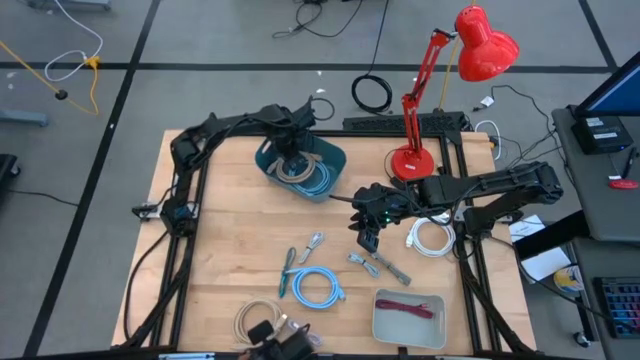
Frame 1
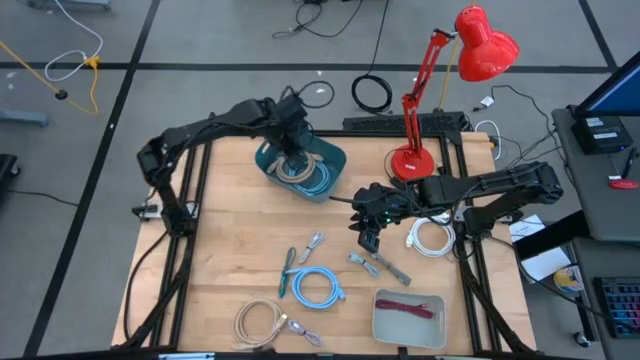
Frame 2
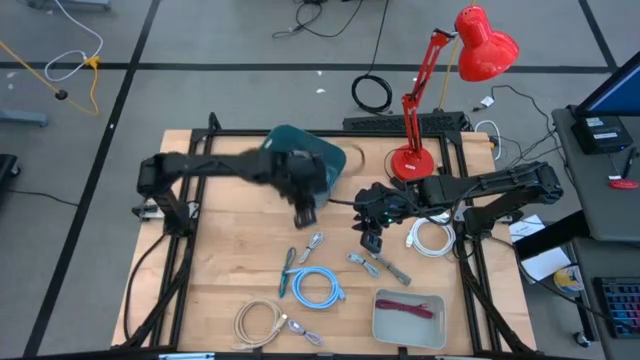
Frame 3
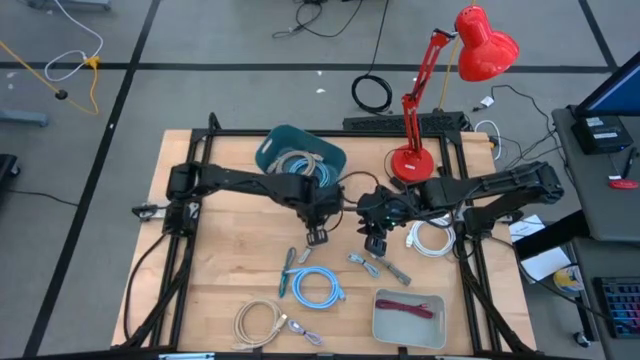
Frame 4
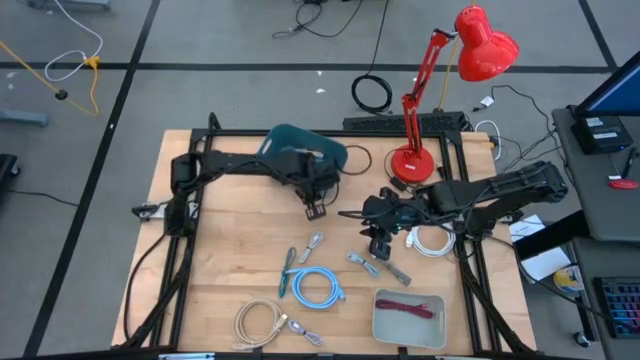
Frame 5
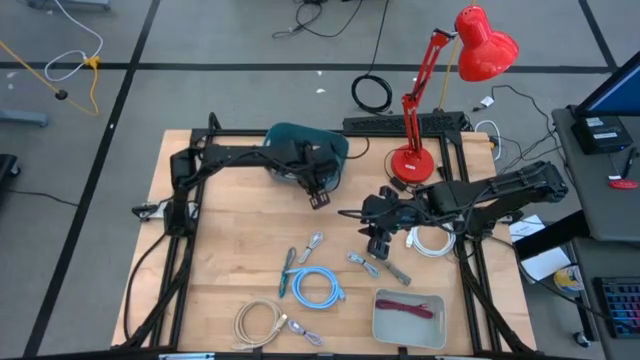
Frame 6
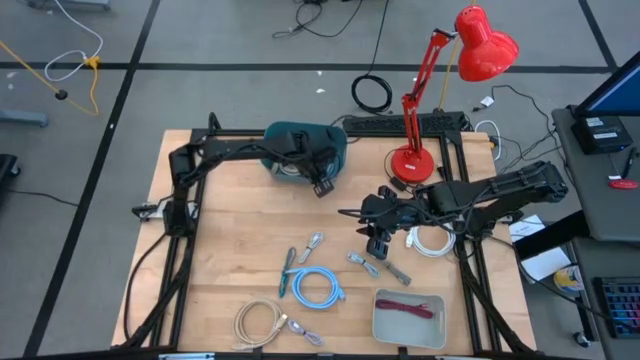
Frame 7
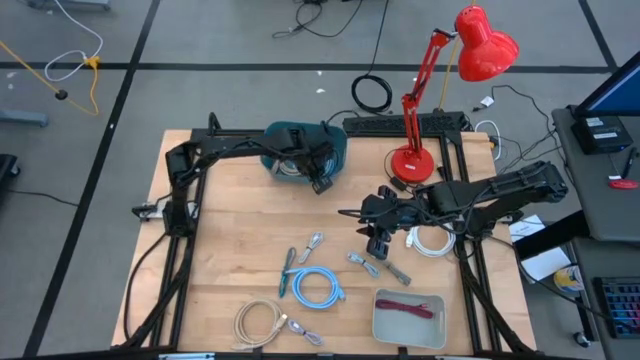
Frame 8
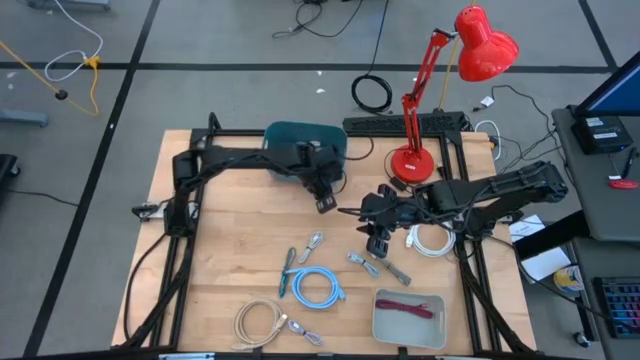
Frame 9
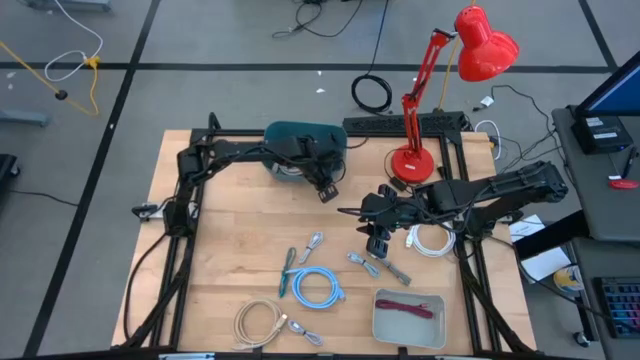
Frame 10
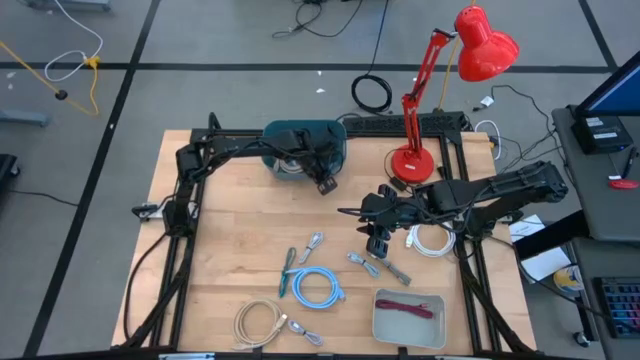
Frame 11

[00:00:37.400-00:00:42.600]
Task: Sort cables into bins
Adjust the blue bin on the table

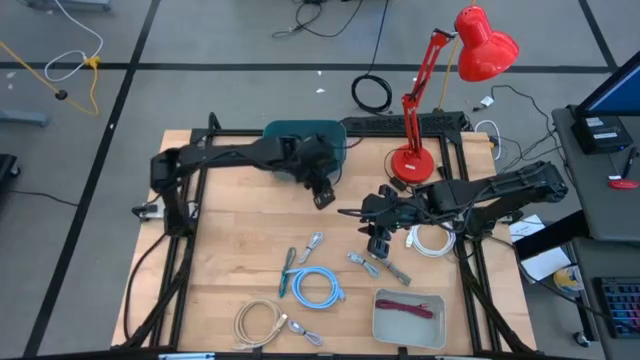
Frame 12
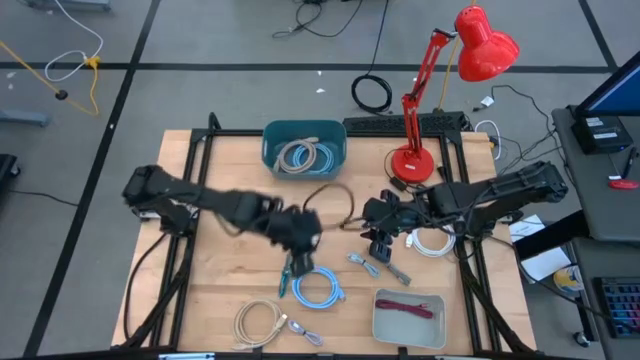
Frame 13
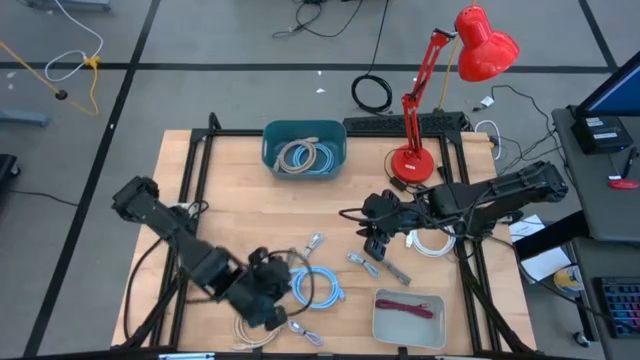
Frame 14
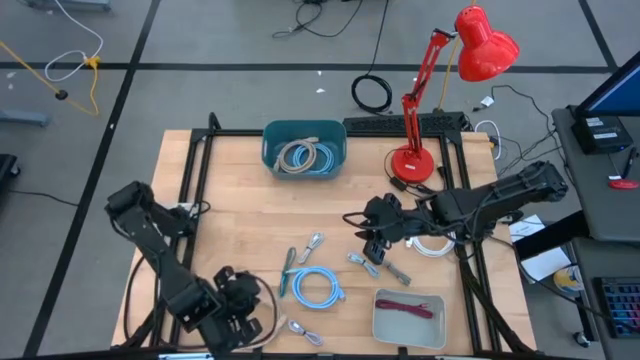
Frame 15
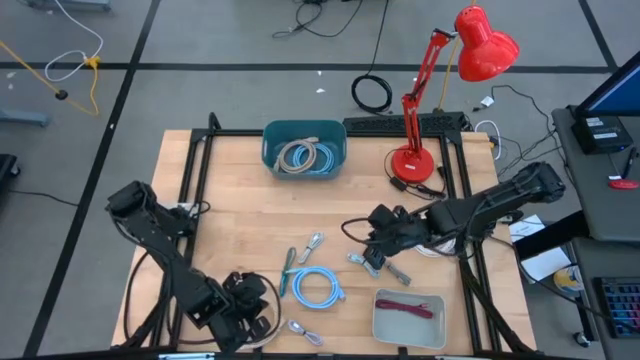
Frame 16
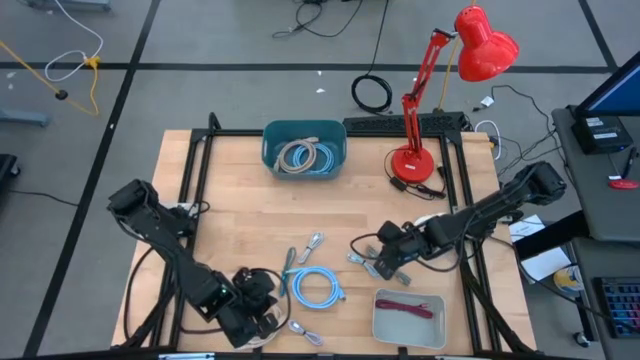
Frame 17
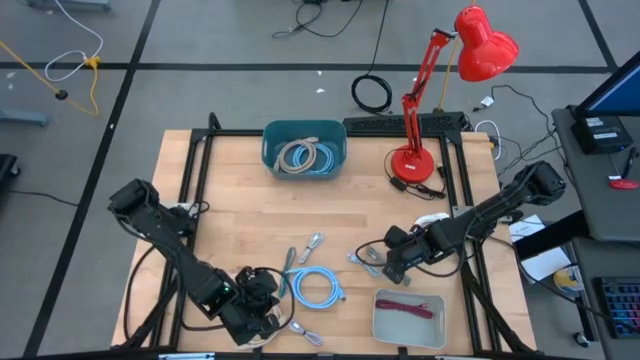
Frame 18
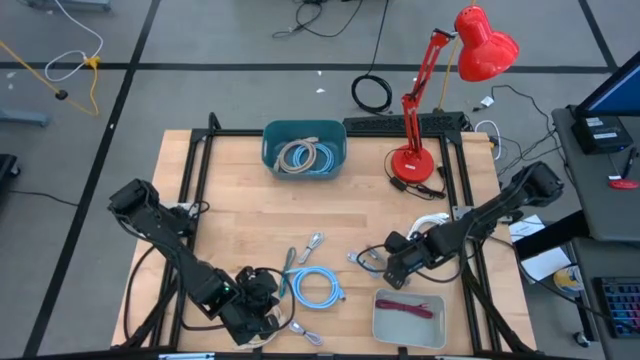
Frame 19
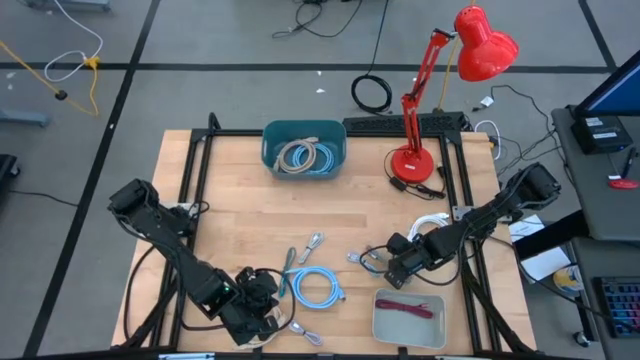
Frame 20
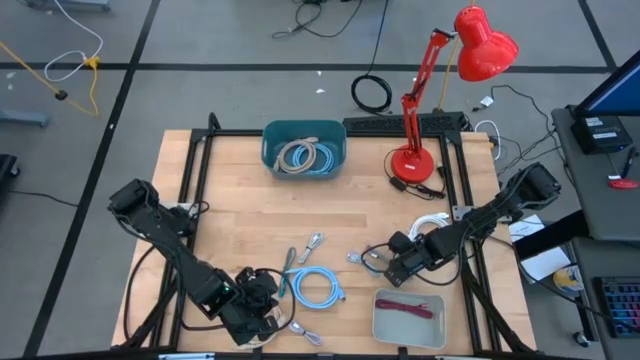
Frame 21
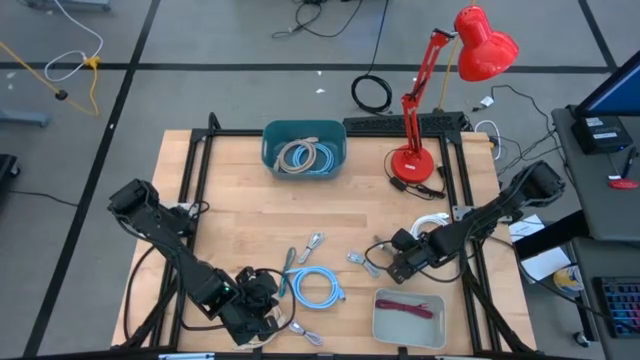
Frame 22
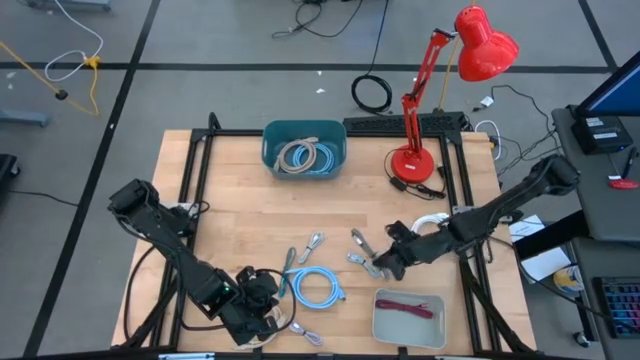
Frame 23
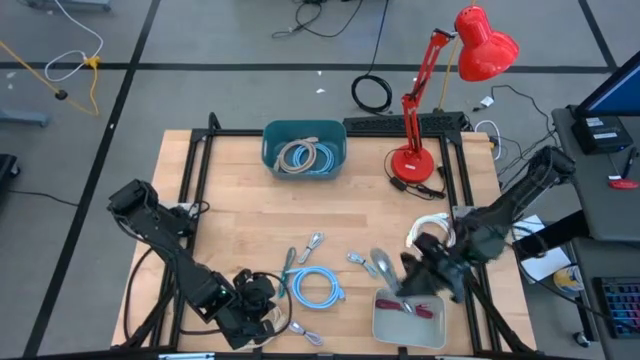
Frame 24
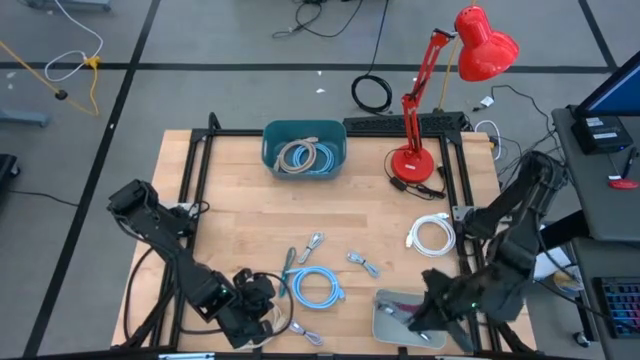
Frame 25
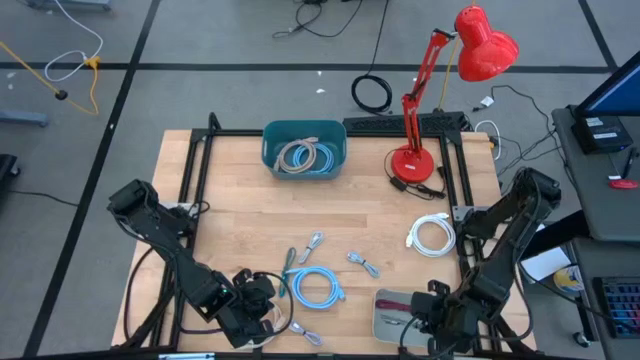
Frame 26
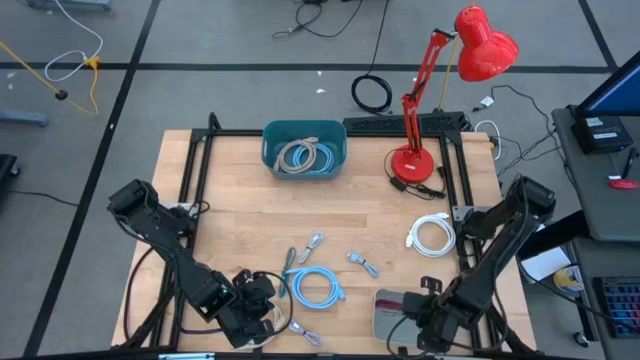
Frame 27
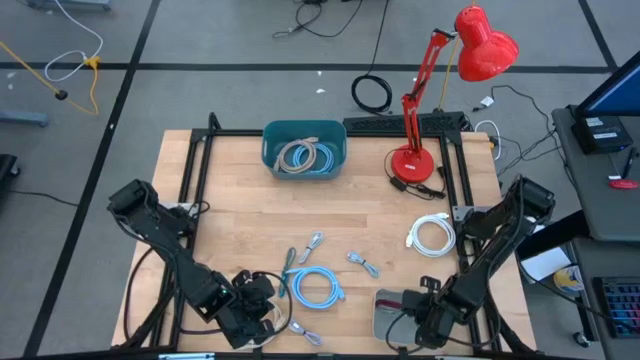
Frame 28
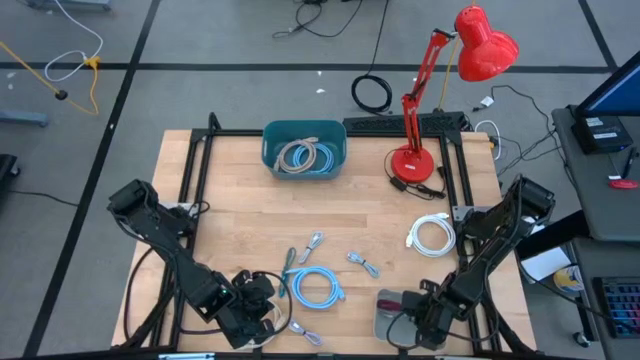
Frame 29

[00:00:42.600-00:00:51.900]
Put the white patterned charger cable into the gray bin

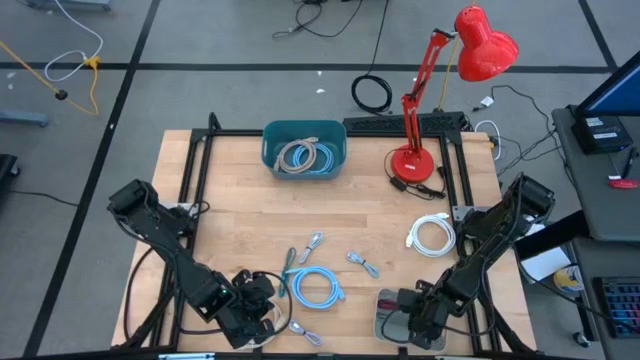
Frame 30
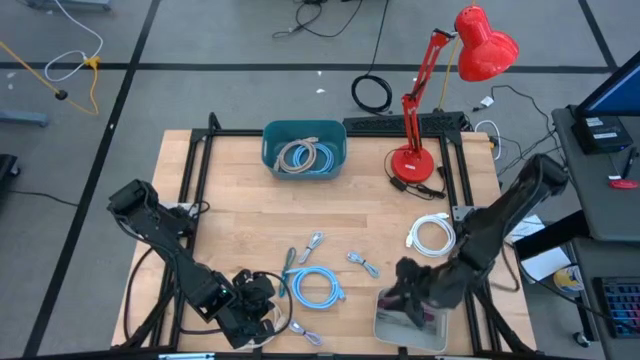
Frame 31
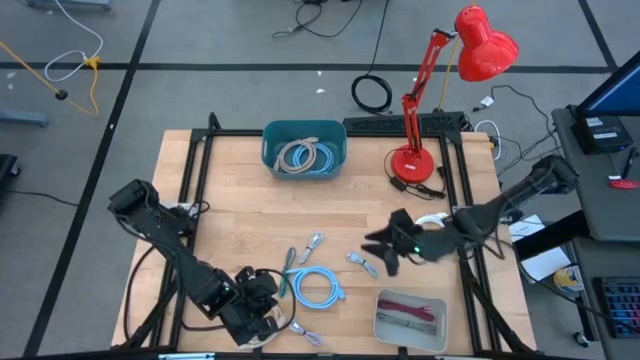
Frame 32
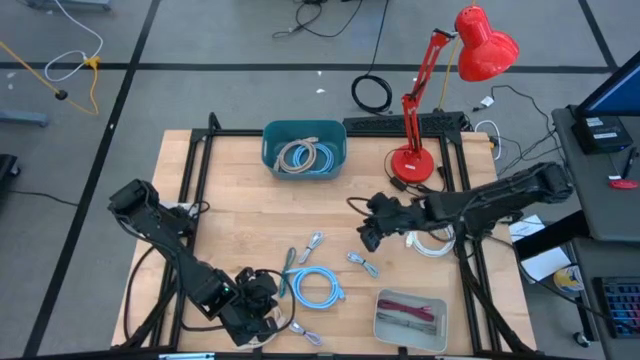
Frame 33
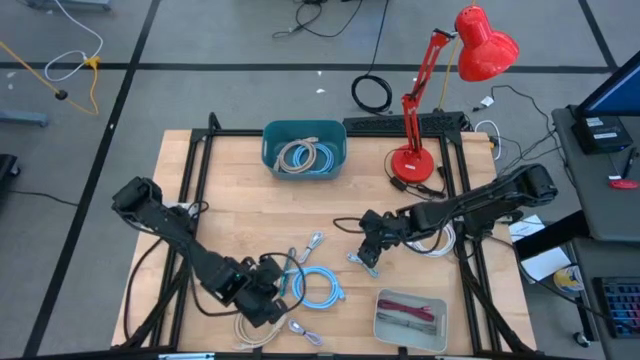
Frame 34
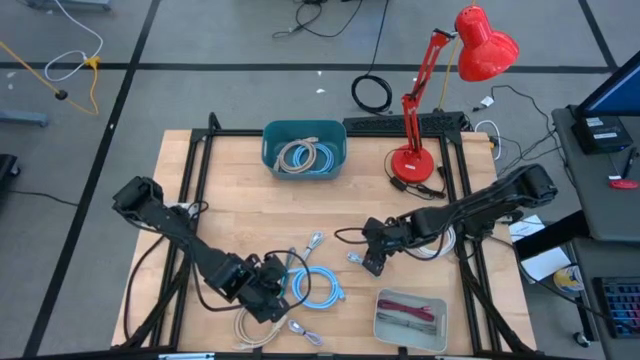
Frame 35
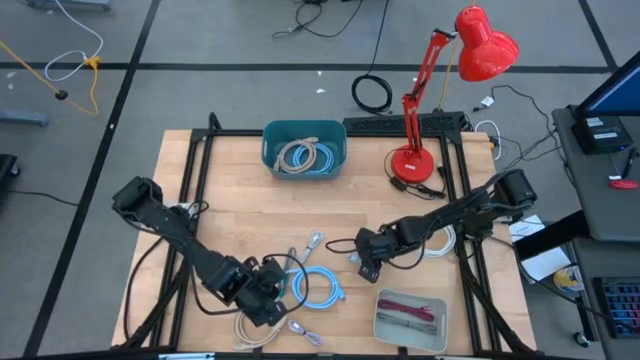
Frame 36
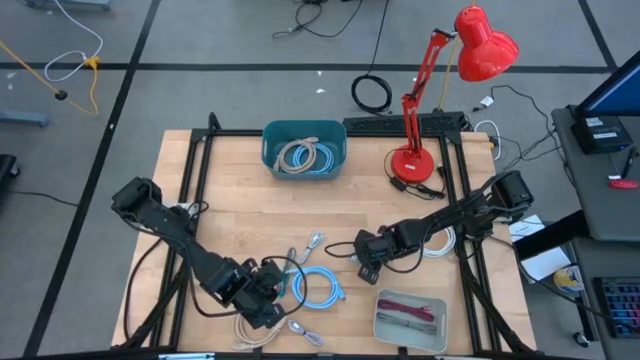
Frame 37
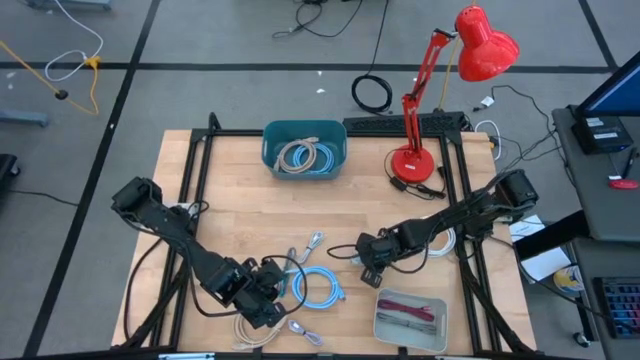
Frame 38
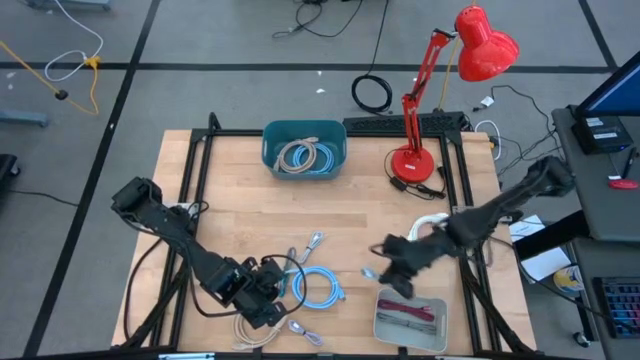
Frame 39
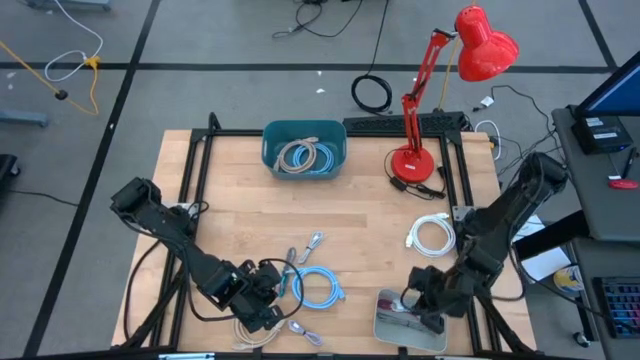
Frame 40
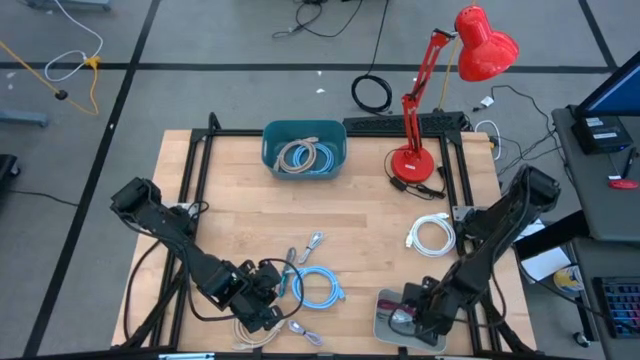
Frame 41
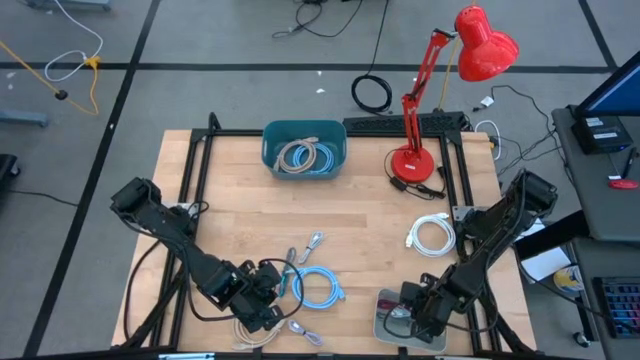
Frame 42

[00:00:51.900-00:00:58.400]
Put the light blue charger cable into the gray bin
